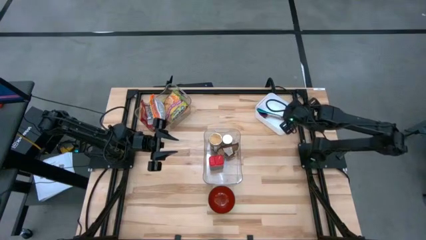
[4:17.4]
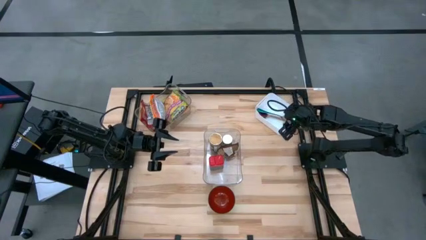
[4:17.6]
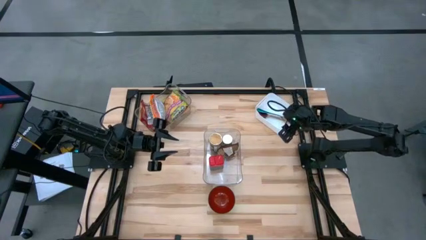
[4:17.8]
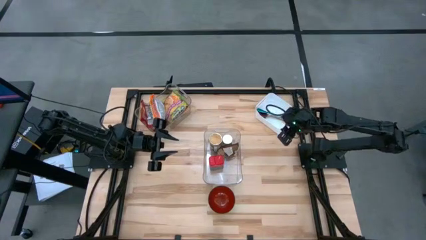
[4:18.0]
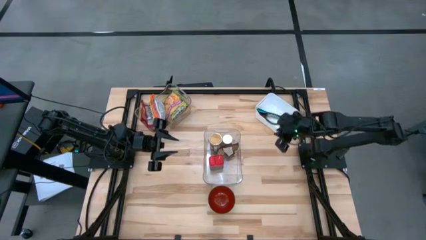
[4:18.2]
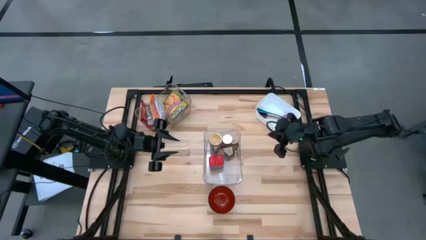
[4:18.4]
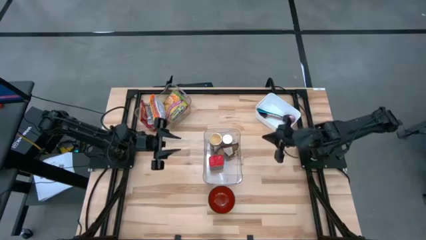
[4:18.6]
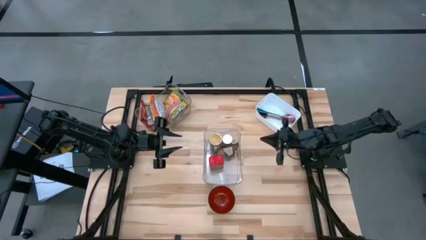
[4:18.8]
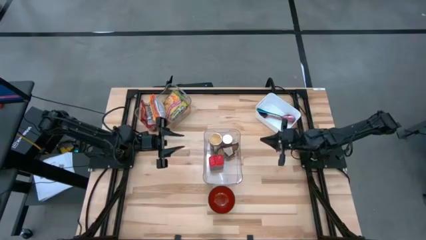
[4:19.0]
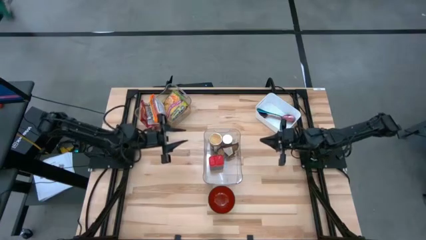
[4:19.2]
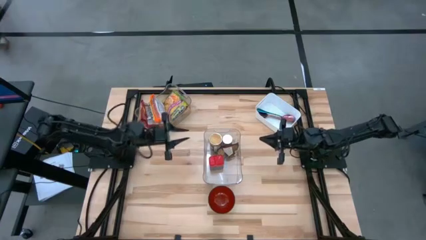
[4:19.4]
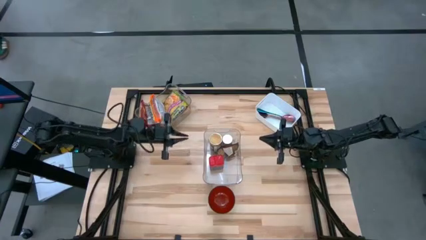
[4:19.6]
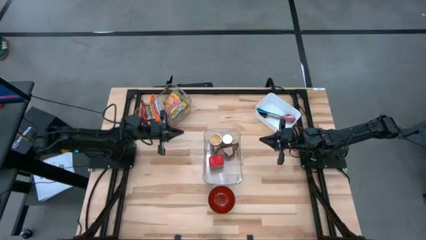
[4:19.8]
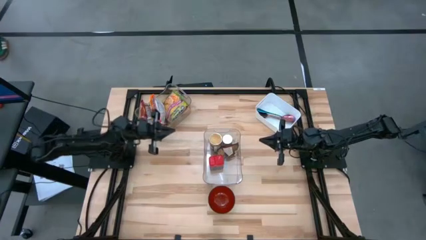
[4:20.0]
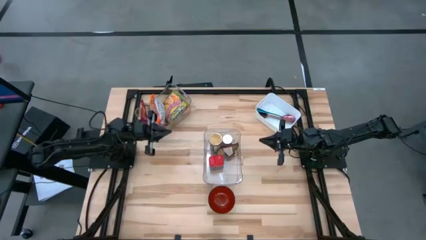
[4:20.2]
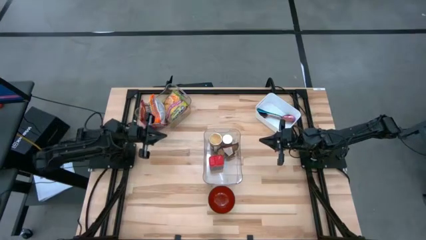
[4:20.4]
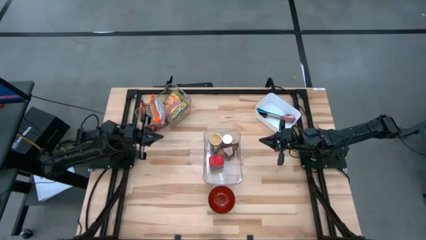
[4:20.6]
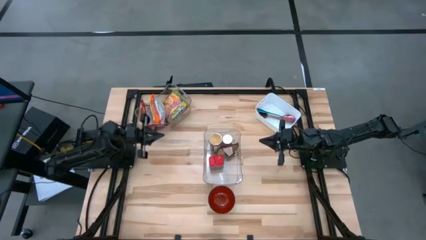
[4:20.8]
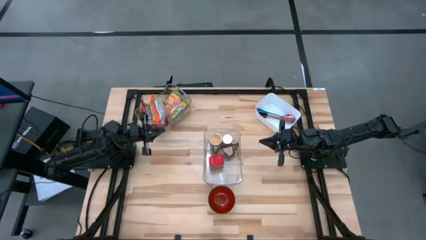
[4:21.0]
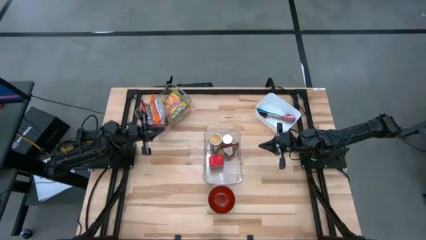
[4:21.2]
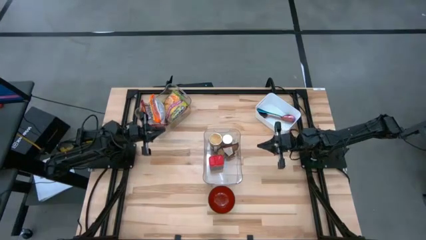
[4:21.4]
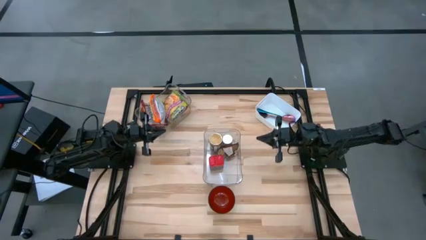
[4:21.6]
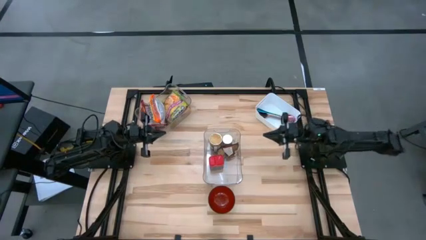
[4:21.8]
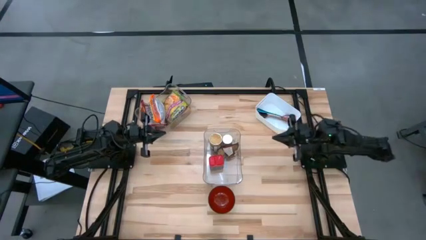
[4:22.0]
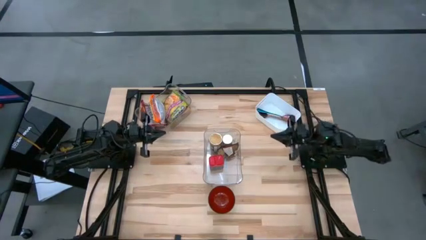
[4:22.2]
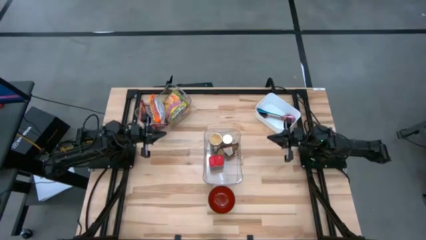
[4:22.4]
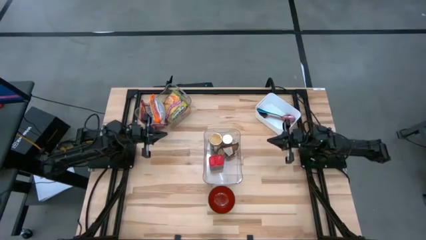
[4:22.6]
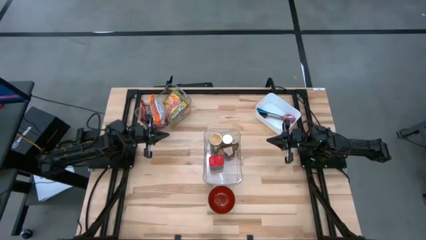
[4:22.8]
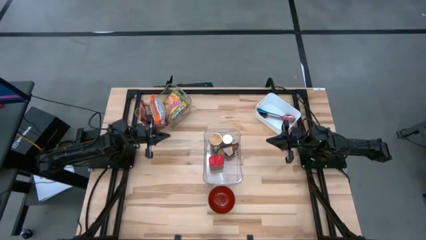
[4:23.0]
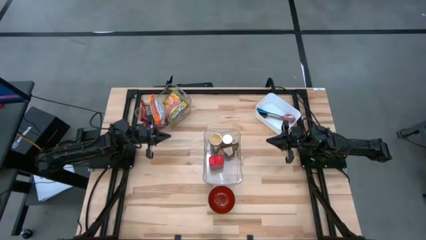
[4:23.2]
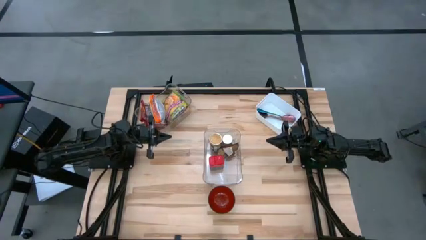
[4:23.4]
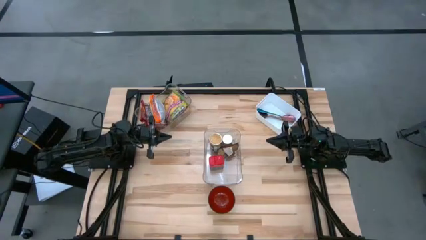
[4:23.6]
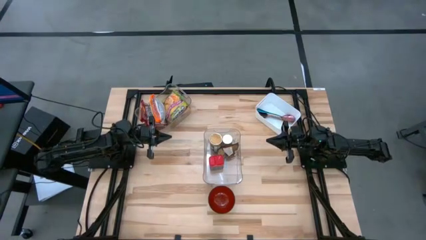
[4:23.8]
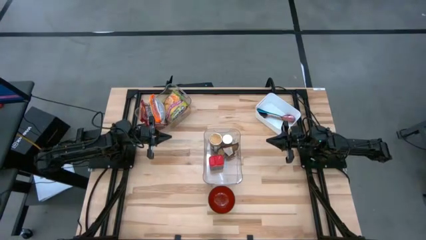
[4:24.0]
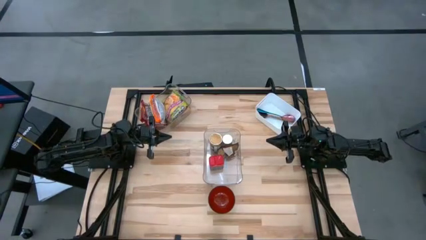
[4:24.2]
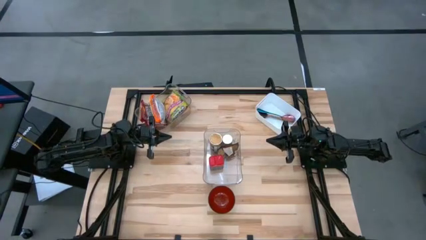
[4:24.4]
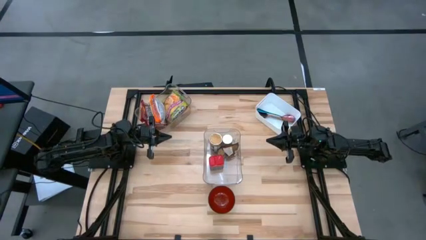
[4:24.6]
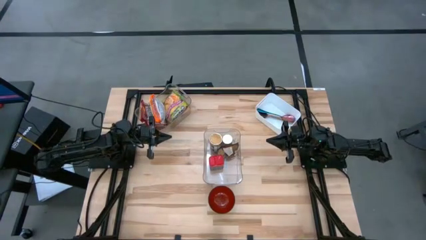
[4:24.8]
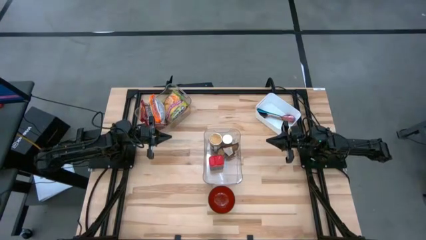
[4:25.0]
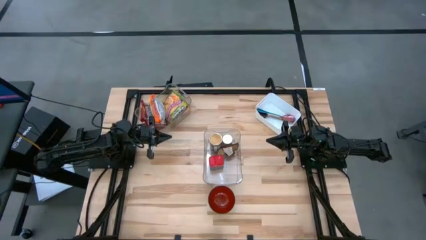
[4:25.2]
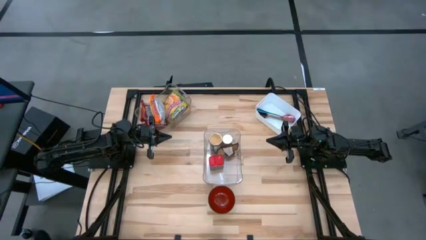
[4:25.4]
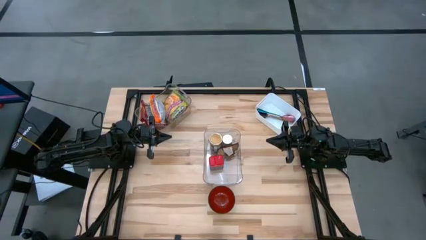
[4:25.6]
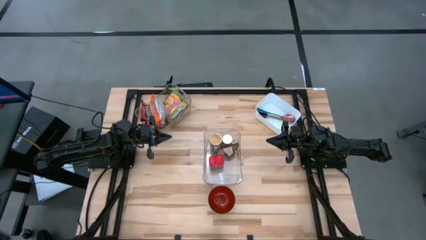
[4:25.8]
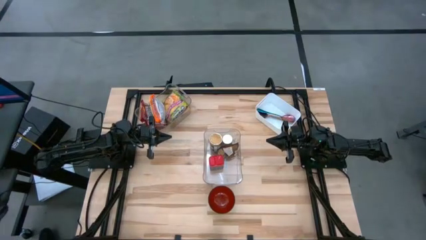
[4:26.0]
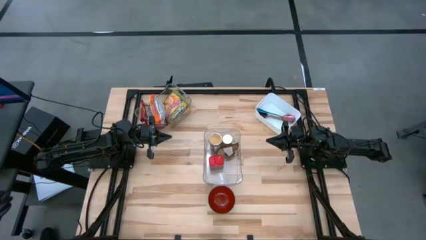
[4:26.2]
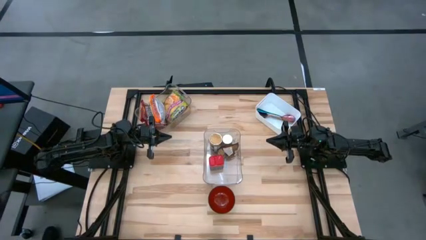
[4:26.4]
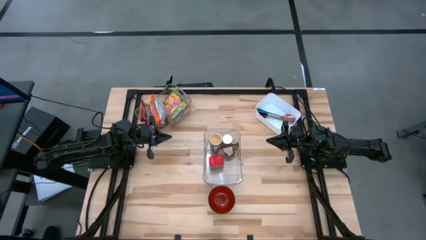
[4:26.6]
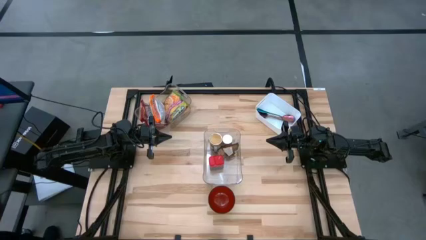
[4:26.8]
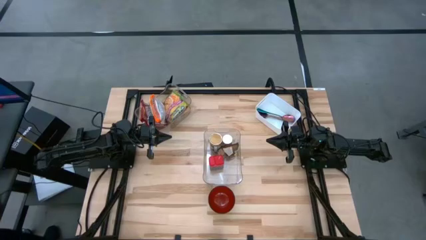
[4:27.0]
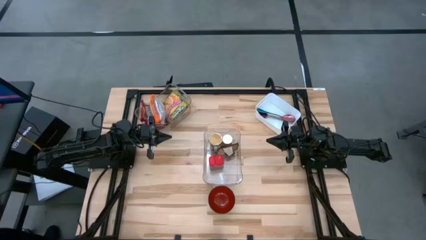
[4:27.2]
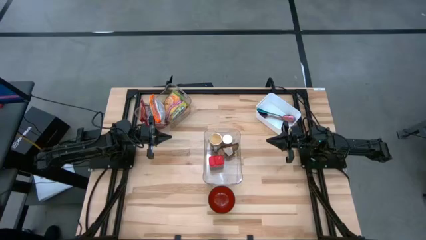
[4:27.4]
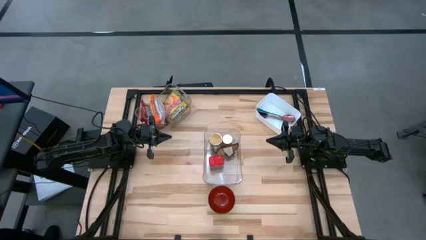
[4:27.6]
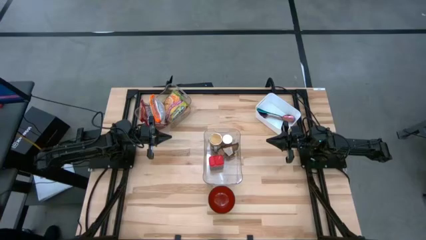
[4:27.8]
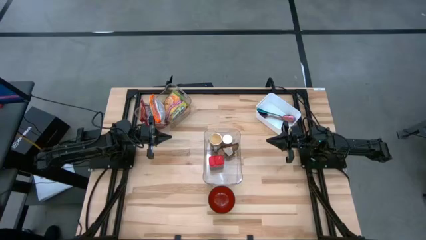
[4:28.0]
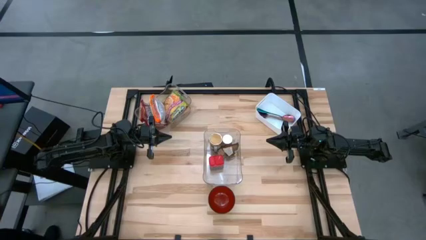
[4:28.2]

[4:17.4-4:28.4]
Task: Pick & Place Food Item
Return to Home Position

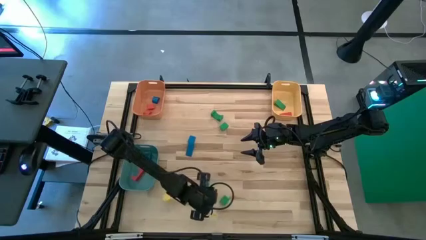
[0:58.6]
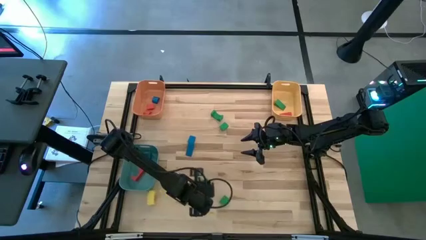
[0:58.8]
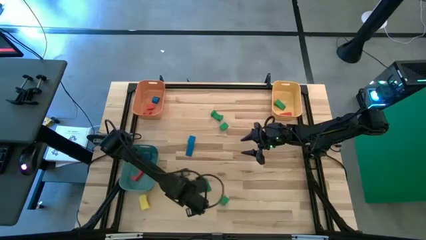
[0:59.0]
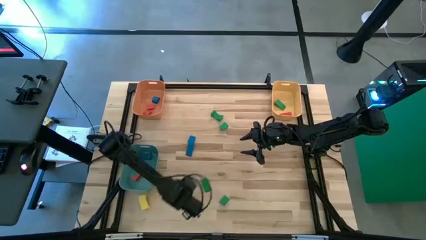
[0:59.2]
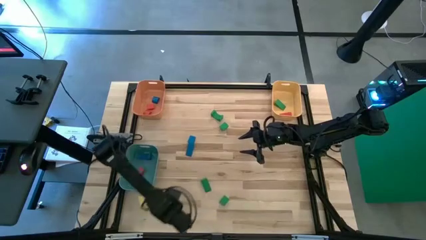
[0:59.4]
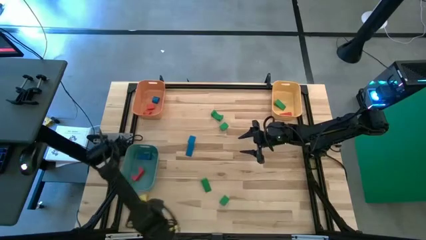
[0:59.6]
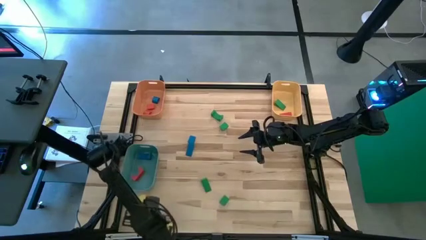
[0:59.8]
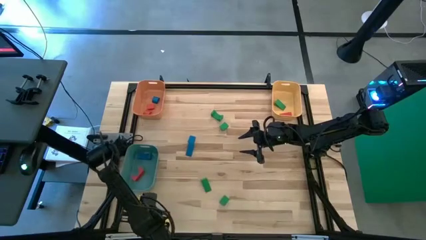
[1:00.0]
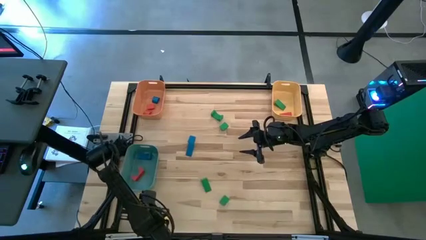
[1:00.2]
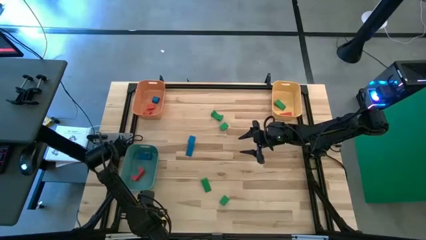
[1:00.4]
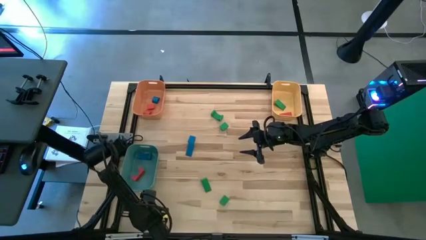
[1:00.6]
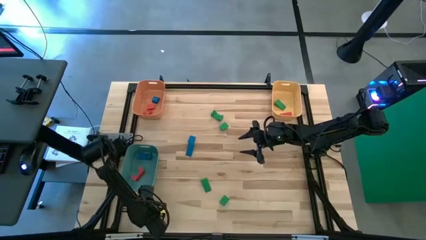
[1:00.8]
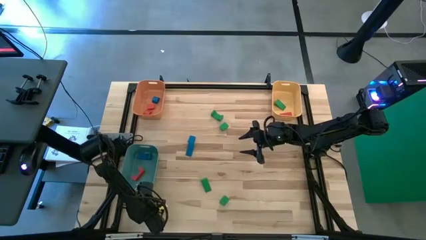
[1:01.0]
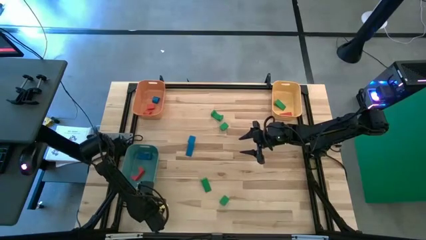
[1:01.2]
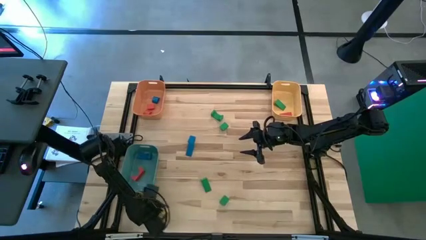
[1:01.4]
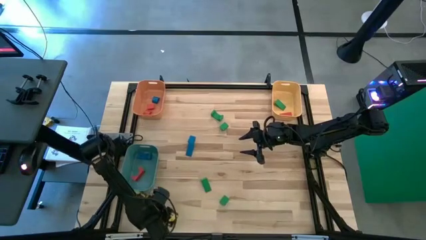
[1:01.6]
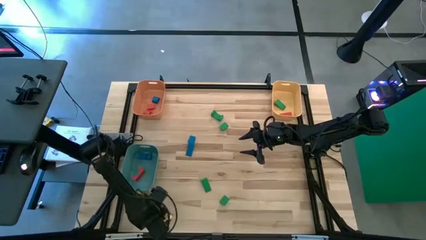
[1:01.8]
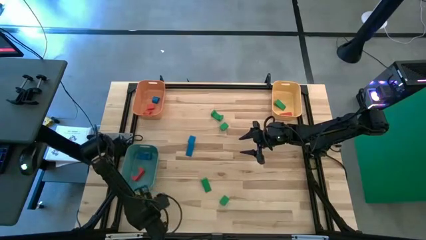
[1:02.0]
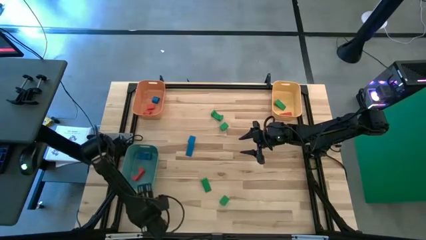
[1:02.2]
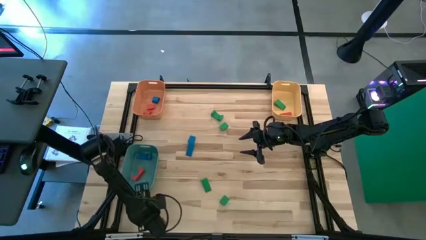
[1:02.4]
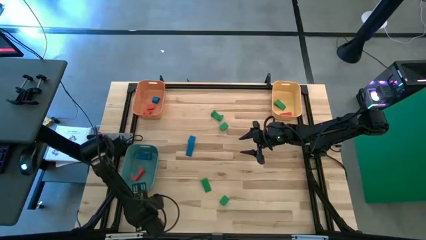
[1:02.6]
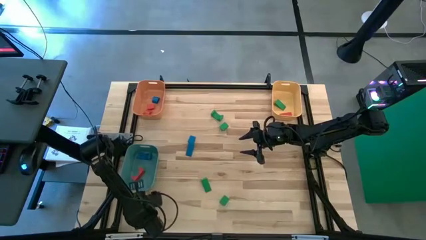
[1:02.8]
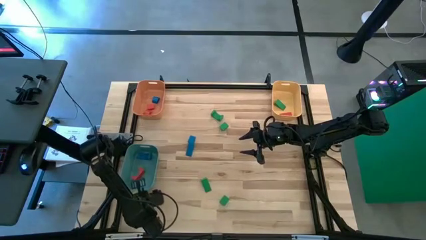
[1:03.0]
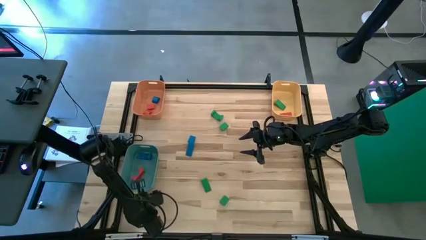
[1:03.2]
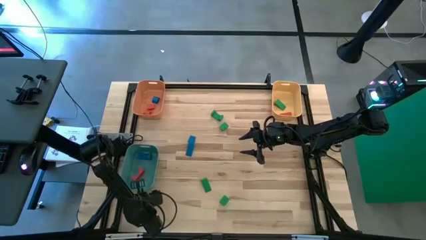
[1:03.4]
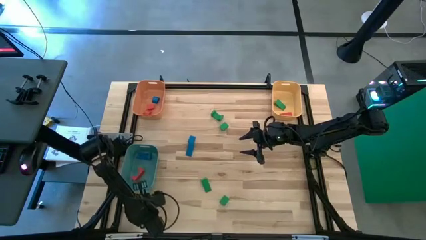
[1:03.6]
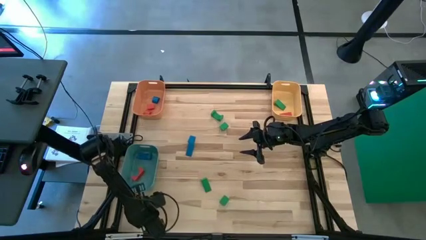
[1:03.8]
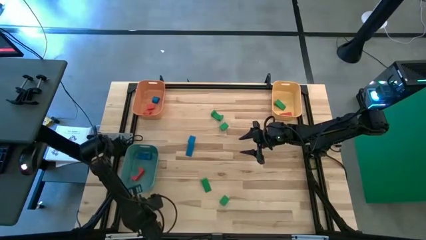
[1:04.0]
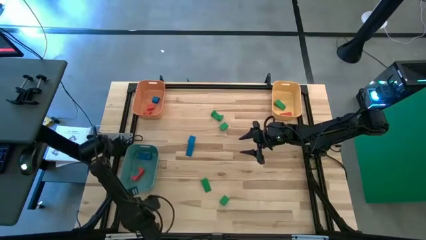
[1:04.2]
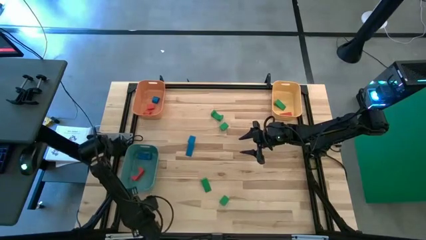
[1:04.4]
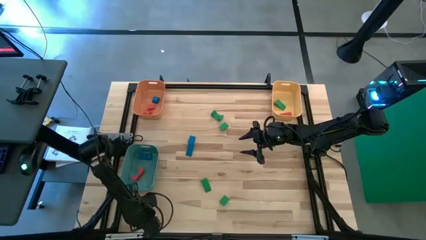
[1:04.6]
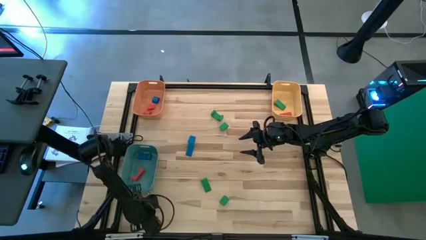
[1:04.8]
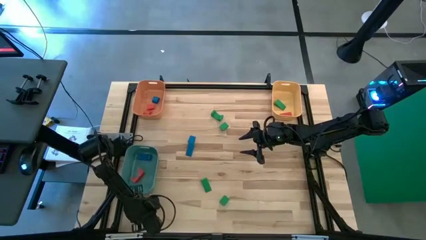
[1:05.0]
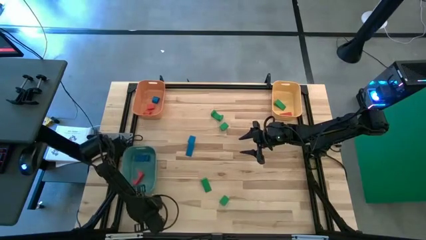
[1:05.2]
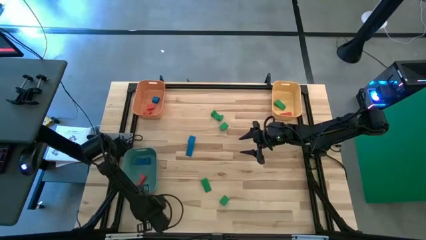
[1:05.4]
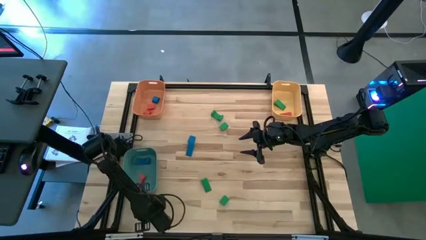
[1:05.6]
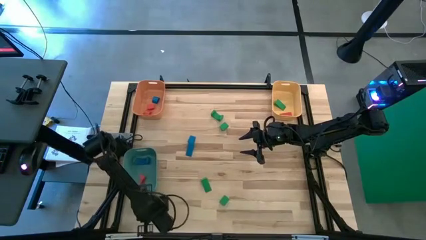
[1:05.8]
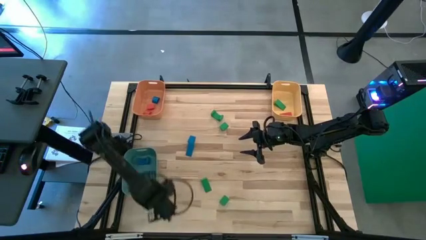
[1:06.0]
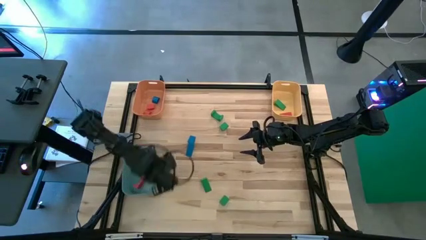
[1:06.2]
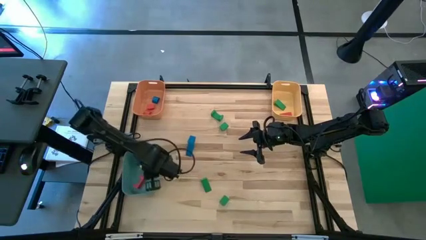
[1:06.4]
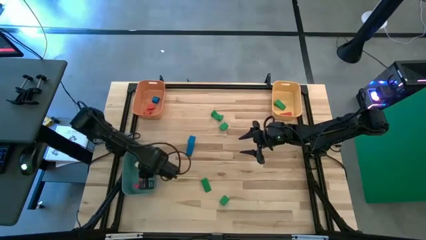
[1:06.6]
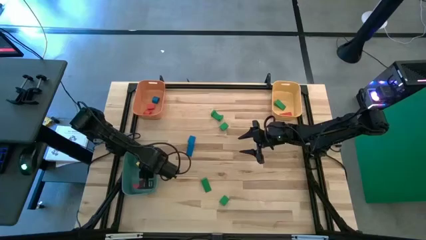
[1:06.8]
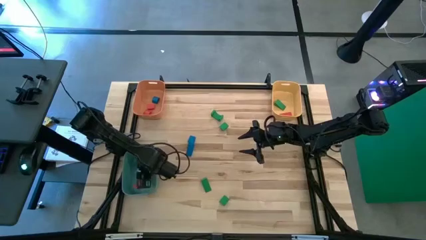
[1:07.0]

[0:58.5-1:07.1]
Task: Sort blocks by size
Put the yellow arch block into the blue bin
